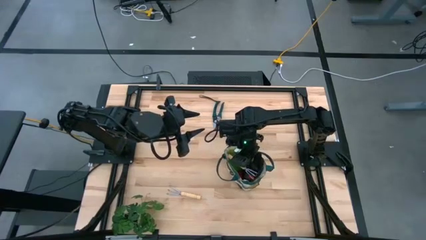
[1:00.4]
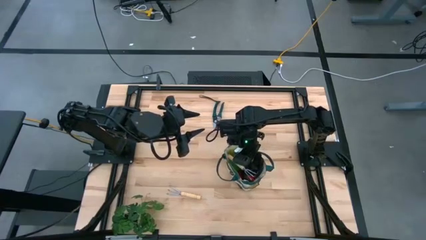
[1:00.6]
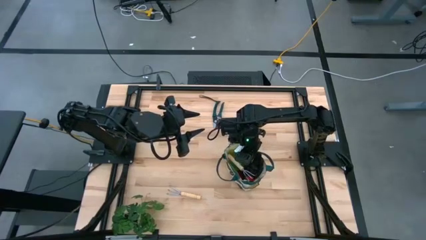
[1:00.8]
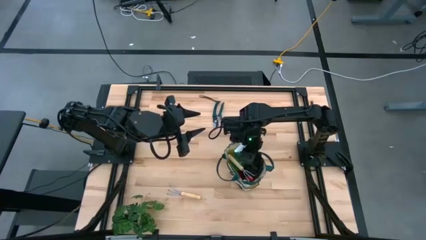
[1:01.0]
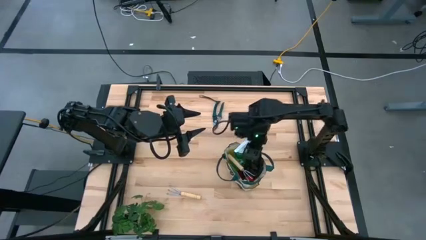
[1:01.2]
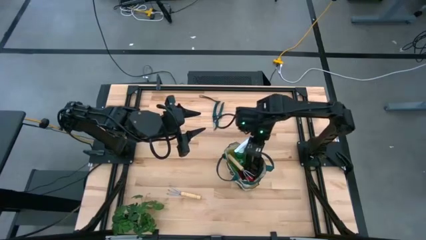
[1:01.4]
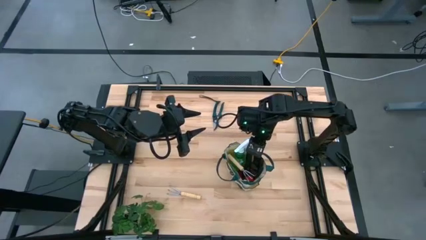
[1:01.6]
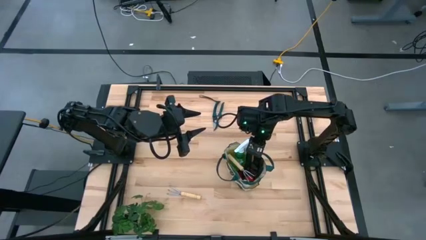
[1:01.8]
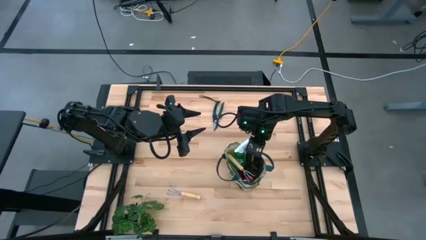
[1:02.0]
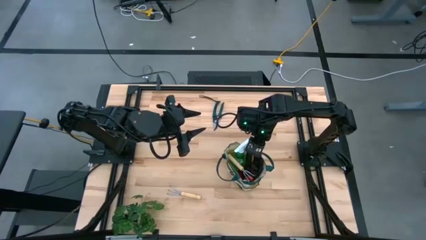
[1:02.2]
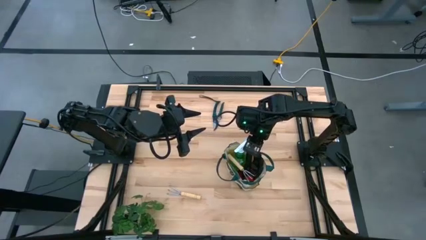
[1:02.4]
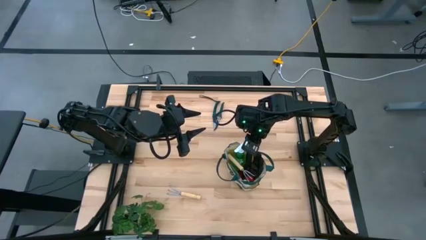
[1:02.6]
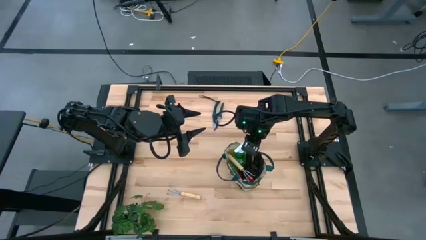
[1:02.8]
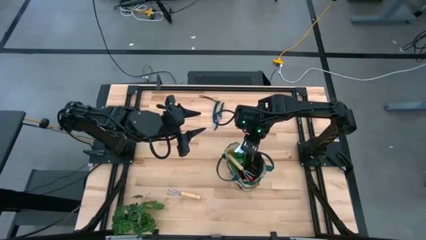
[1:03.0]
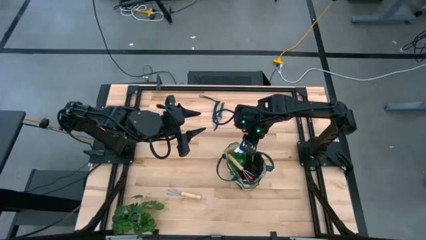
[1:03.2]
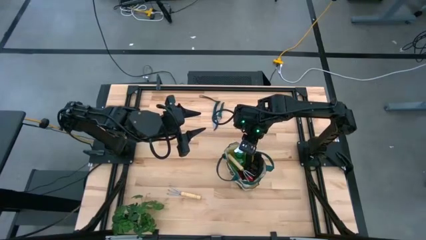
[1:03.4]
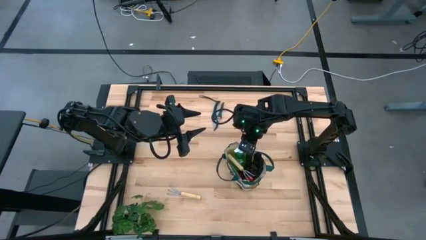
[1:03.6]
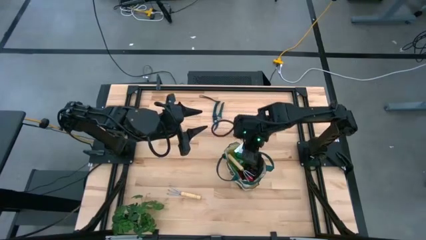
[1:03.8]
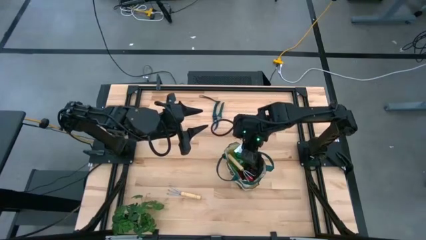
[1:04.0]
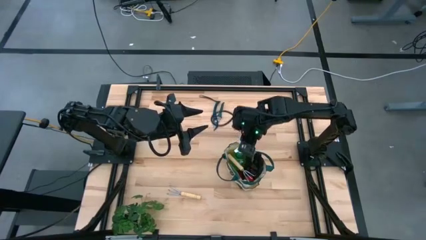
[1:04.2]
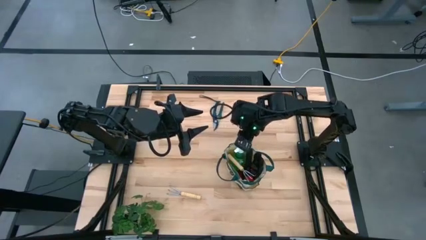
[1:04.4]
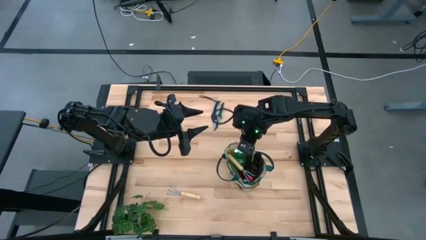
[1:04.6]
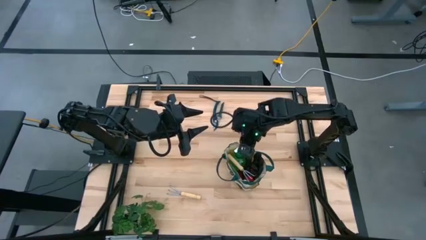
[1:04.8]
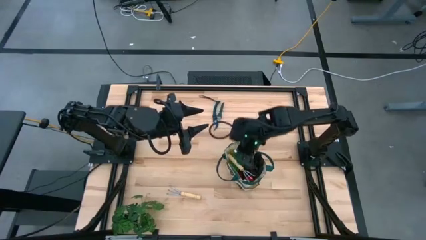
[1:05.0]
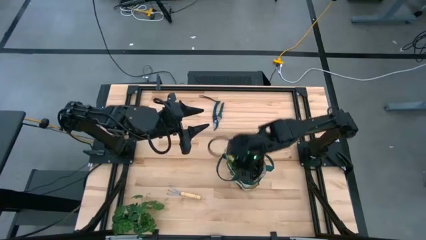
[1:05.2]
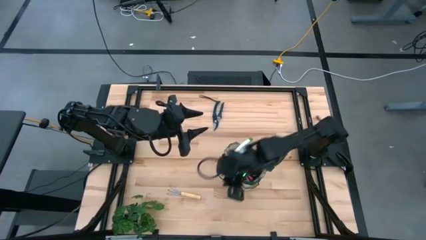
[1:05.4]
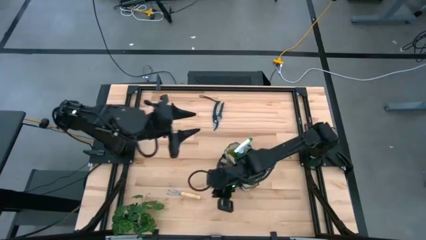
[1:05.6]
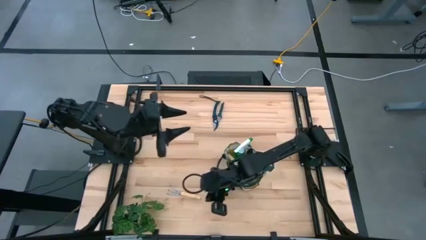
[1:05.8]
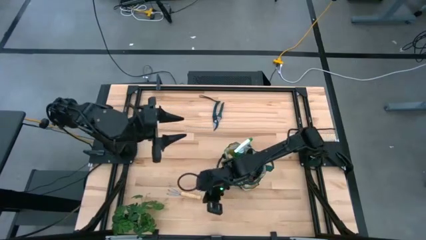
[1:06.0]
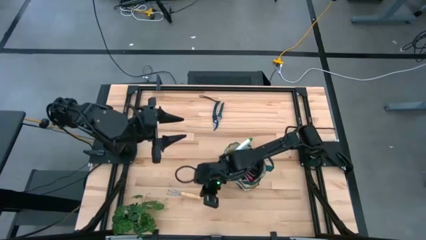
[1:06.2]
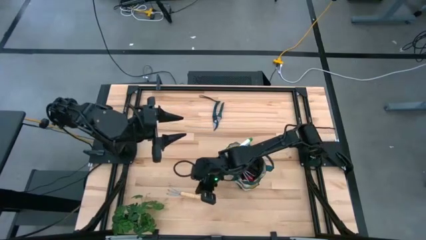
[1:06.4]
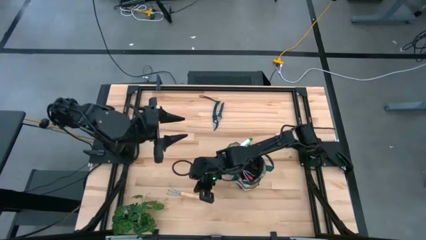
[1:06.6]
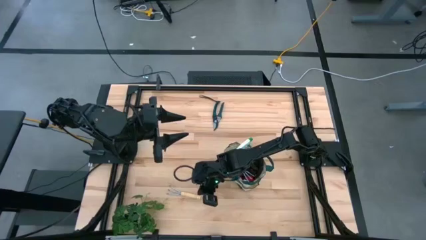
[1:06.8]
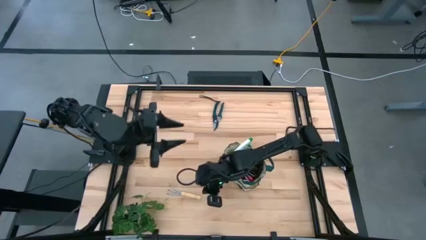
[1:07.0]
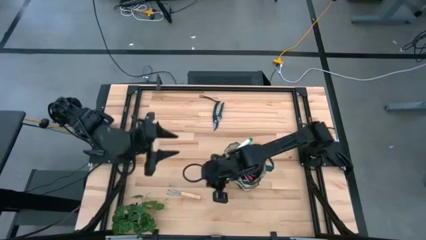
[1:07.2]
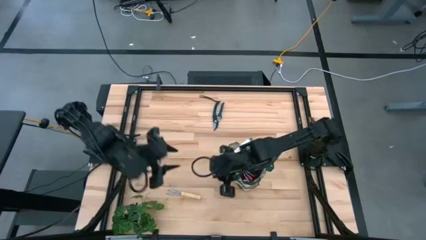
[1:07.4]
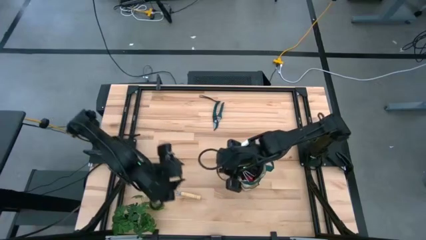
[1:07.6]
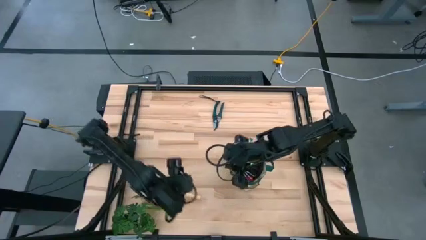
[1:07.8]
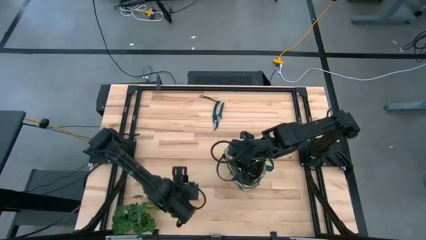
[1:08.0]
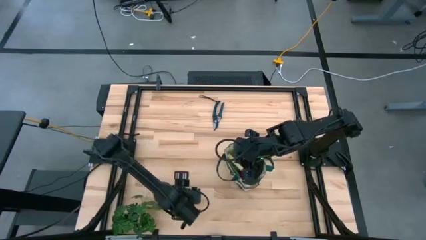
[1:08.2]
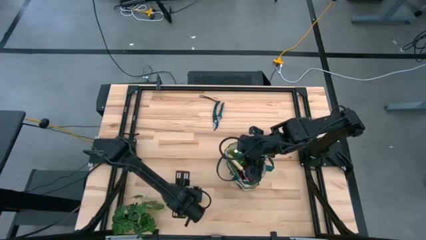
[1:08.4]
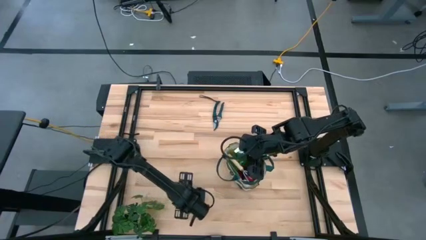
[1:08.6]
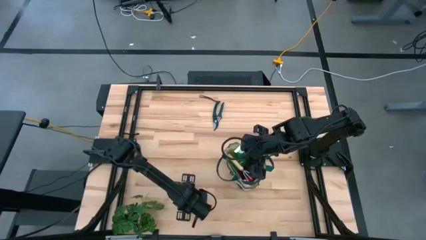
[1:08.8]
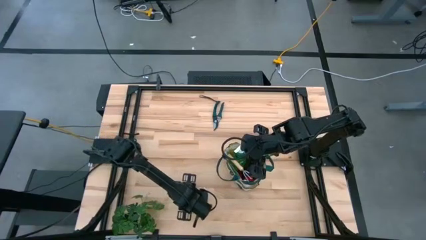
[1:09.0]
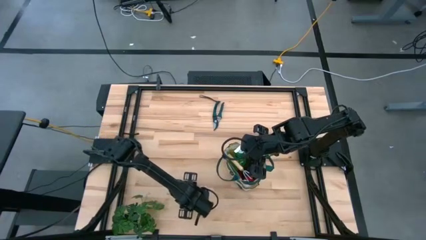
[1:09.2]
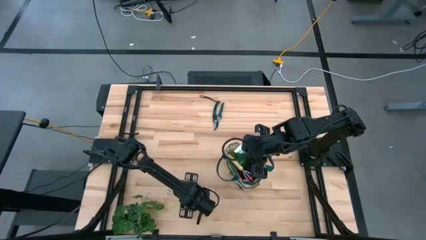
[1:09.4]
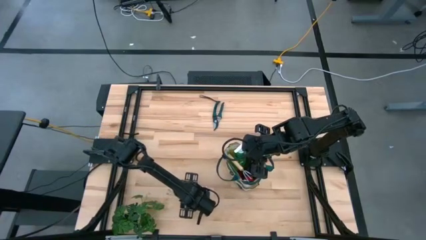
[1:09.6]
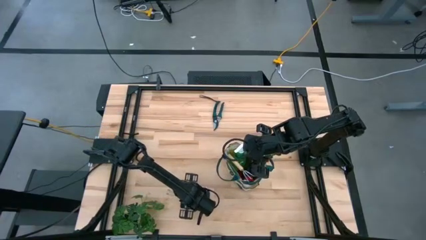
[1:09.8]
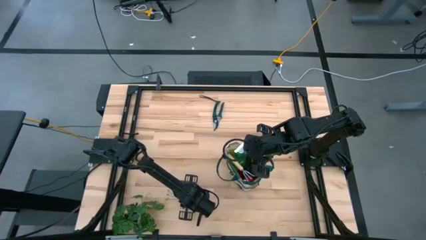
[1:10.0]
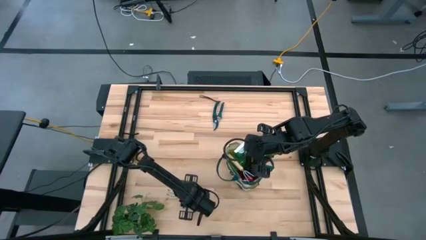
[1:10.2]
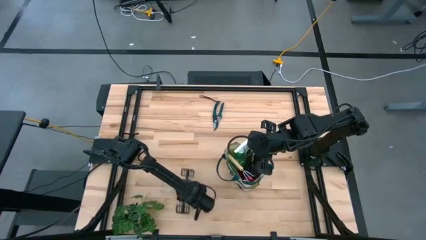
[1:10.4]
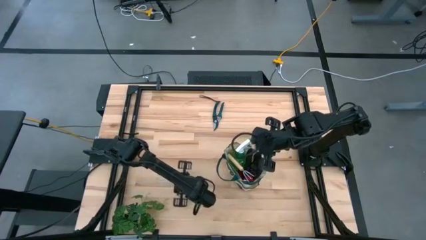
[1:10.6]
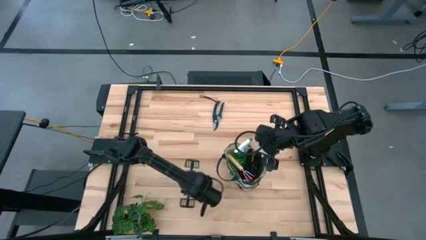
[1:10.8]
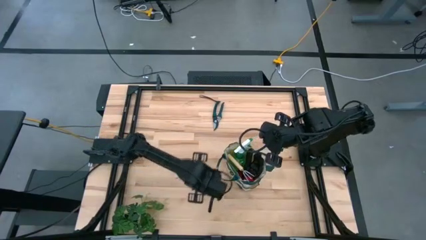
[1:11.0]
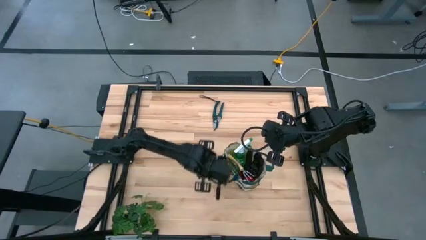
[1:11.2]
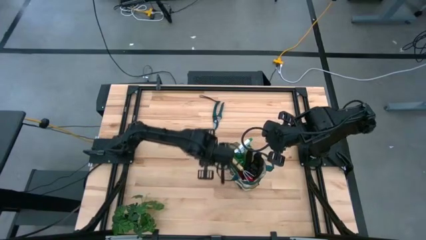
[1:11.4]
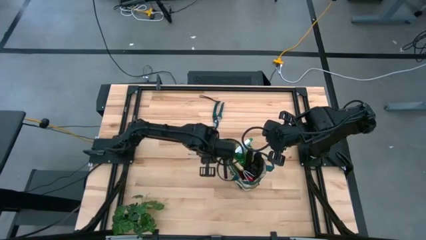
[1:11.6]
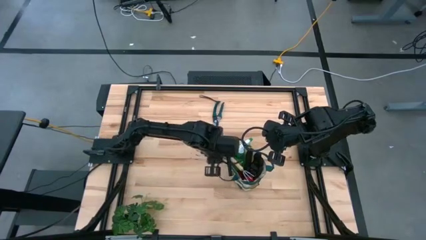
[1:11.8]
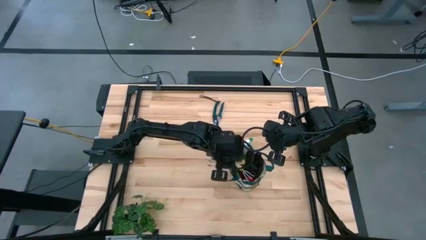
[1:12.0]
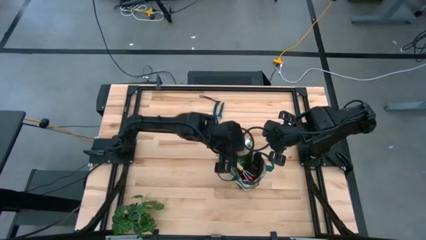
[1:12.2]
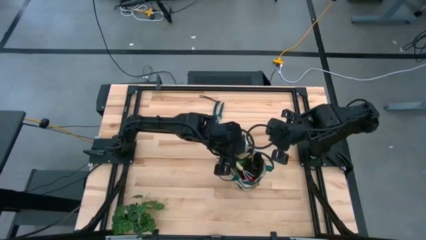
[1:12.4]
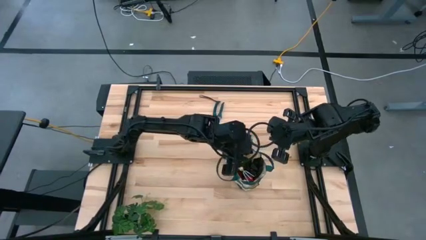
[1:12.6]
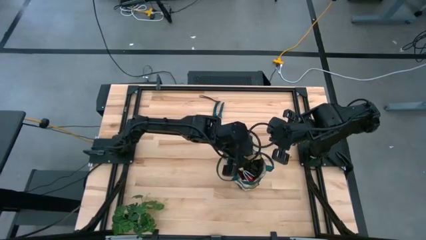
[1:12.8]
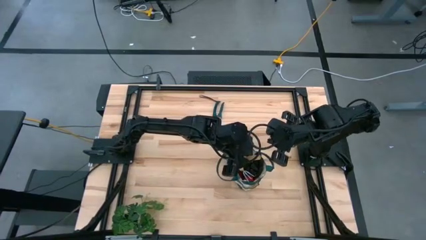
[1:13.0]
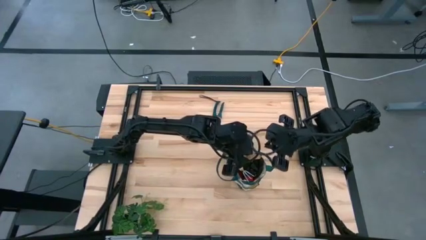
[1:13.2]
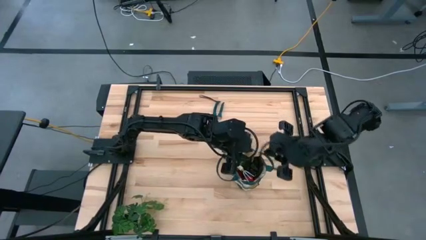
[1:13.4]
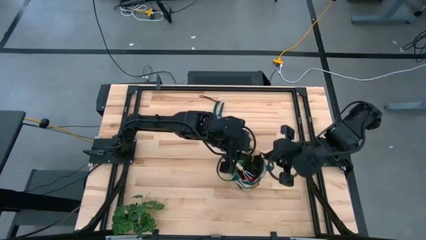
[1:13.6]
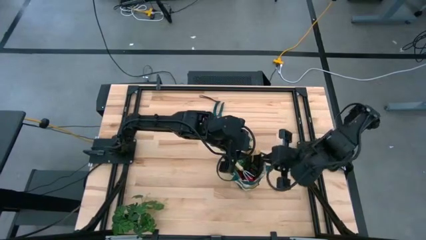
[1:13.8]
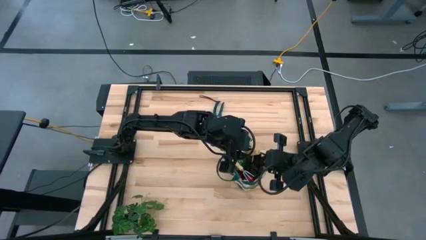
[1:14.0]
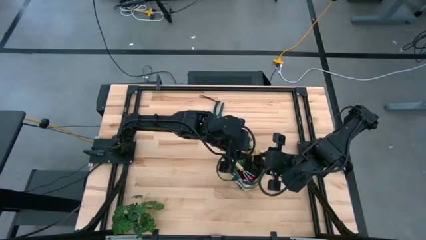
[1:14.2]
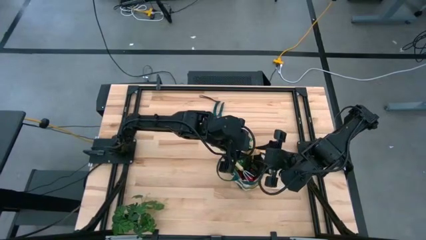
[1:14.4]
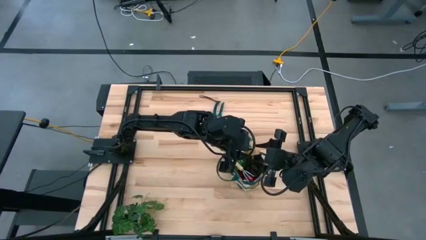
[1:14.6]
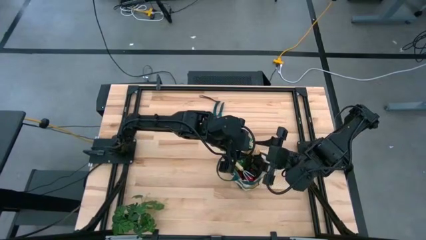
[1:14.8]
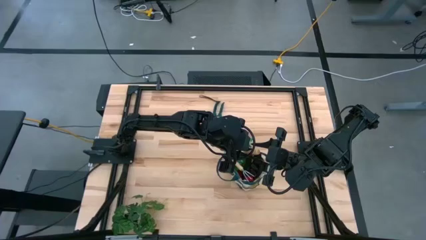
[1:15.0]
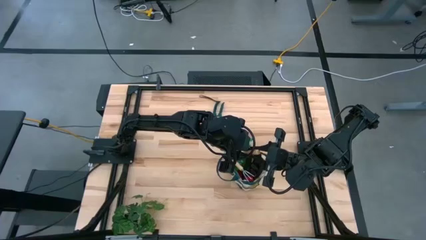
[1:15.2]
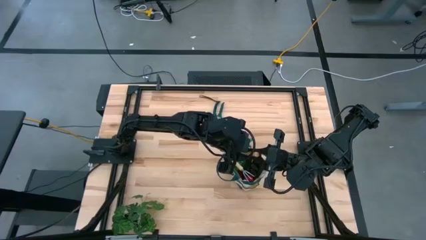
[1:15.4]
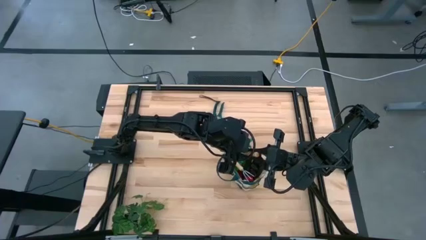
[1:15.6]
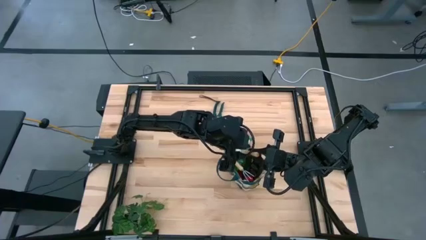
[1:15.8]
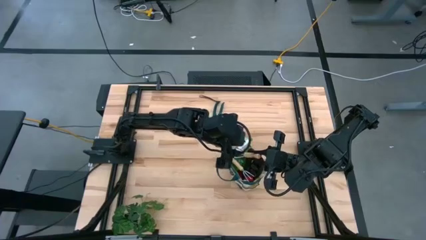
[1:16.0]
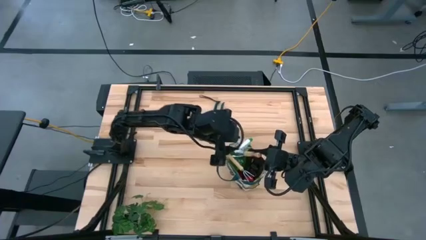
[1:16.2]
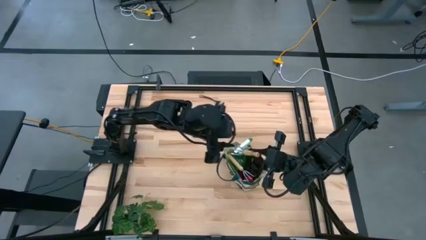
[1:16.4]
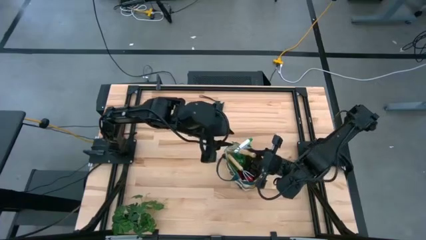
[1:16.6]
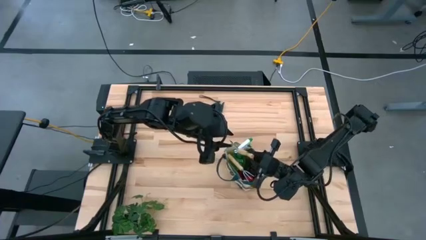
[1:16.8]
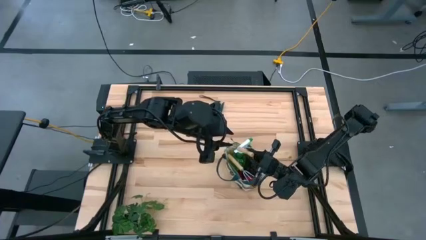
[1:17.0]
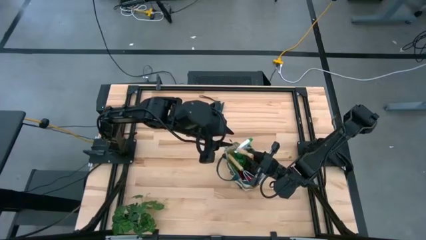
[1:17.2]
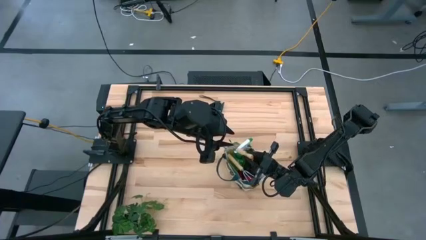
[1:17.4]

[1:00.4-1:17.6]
Task: Pick & Place Garden tools in Gardening bag
Put the brown hand rake into the green gardening bag

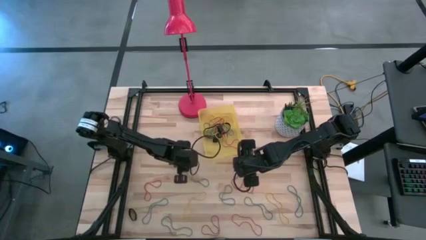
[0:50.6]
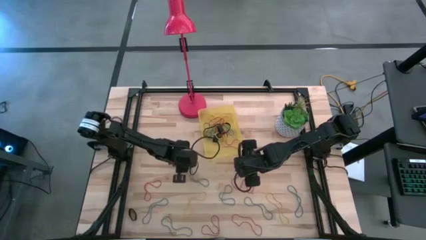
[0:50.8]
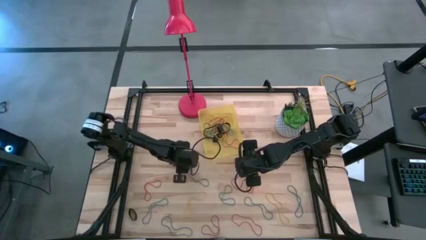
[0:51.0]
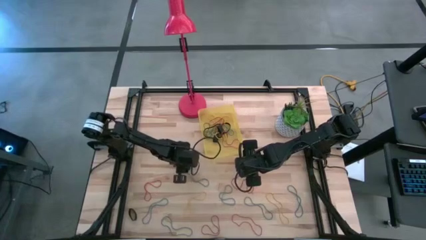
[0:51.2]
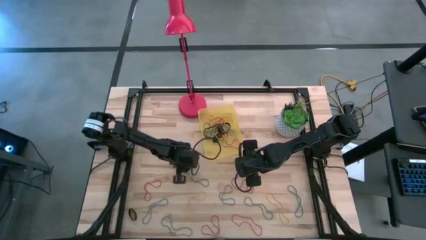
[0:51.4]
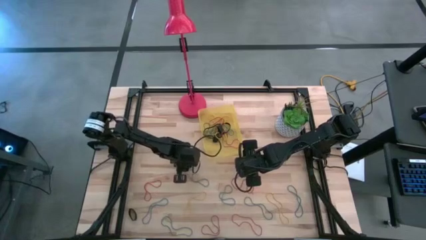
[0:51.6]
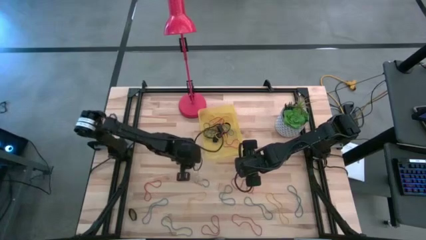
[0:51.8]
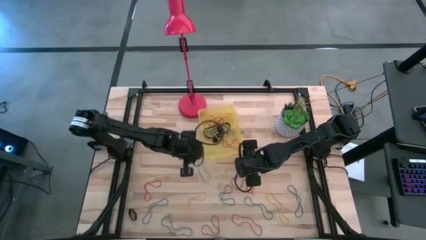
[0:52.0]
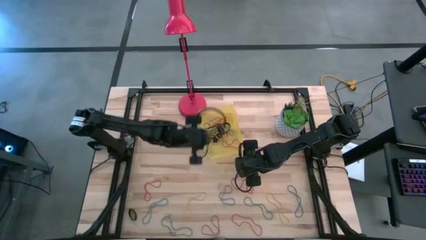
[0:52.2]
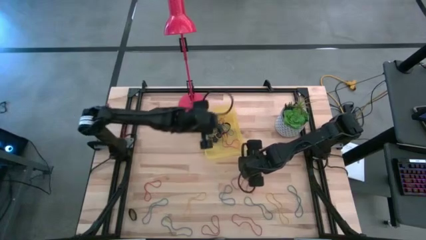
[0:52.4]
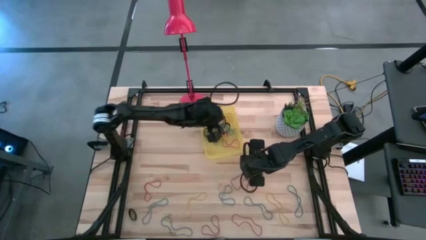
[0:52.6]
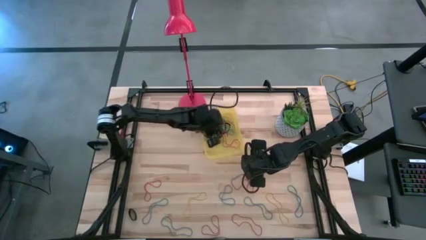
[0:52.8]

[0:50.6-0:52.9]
Task: Pick and place rubber bands into bin
Put the blue rubber band into the yellow bin
